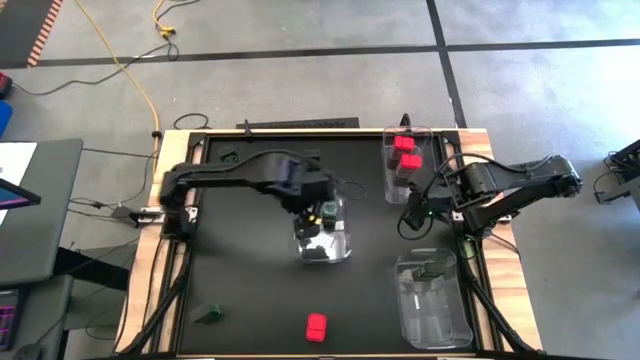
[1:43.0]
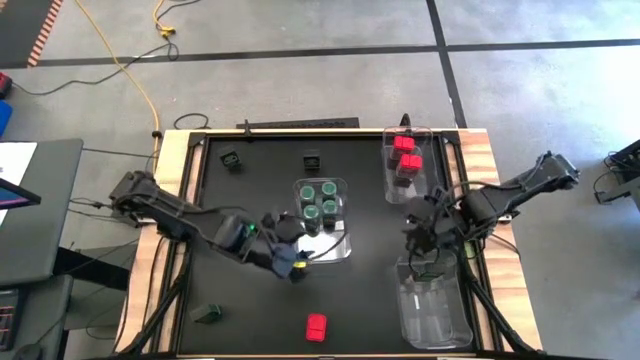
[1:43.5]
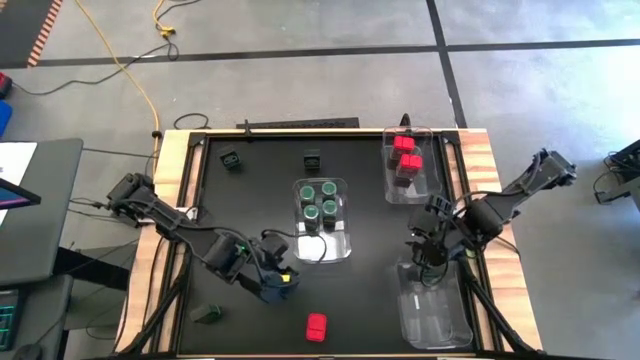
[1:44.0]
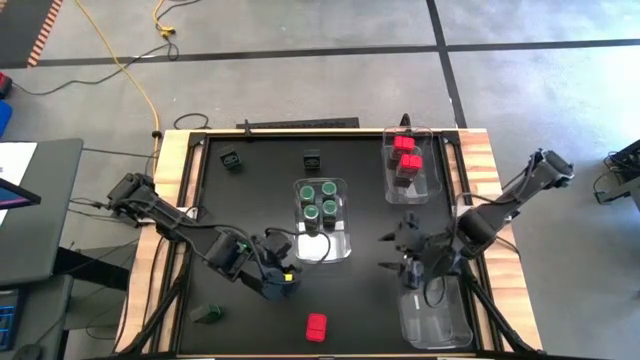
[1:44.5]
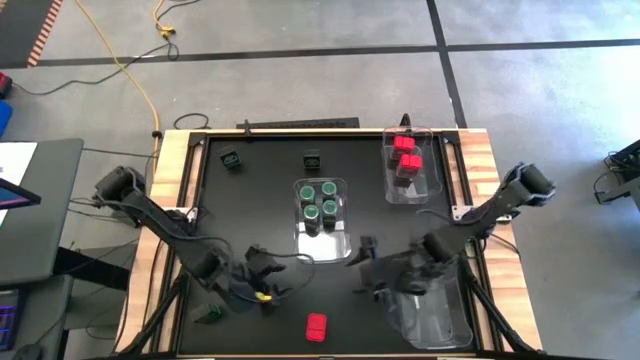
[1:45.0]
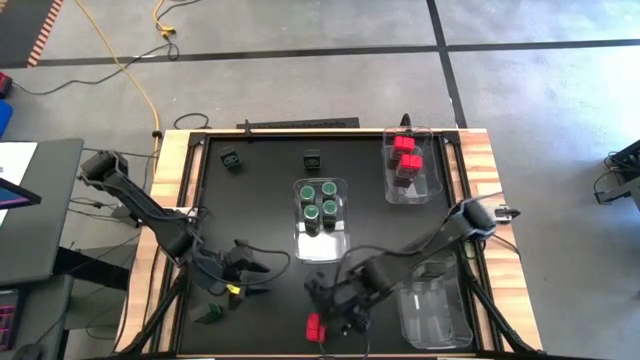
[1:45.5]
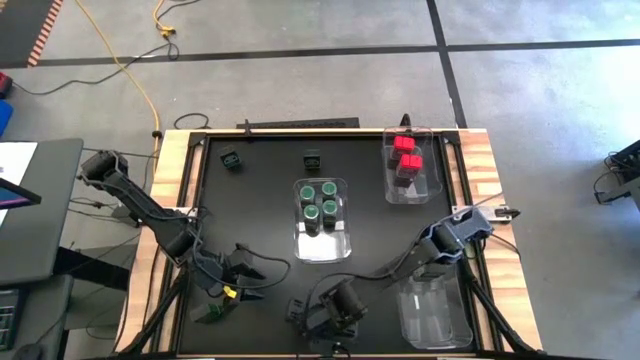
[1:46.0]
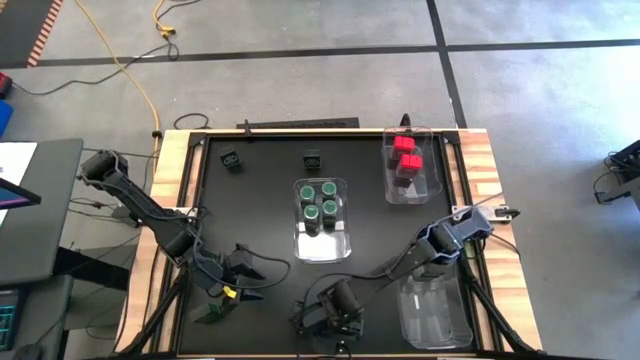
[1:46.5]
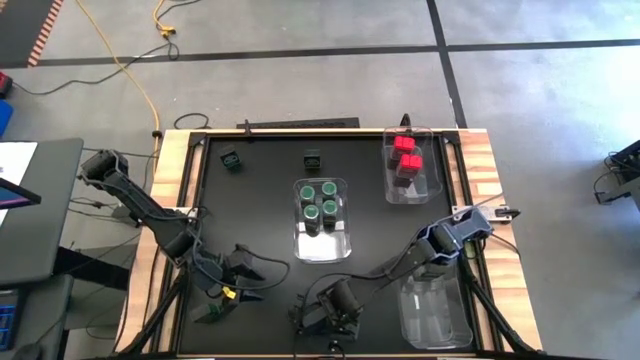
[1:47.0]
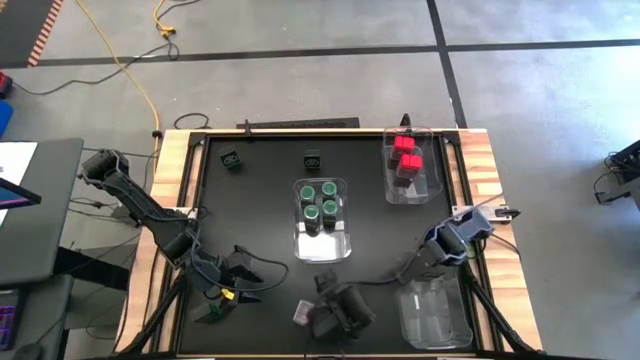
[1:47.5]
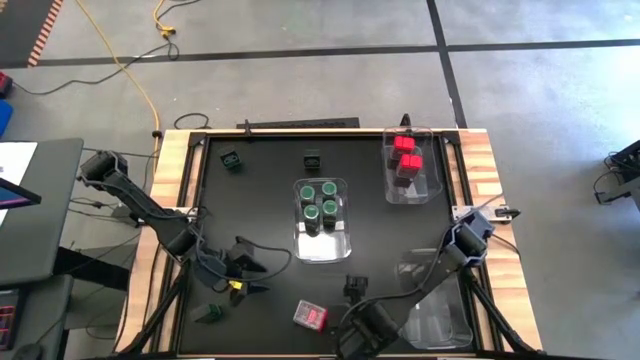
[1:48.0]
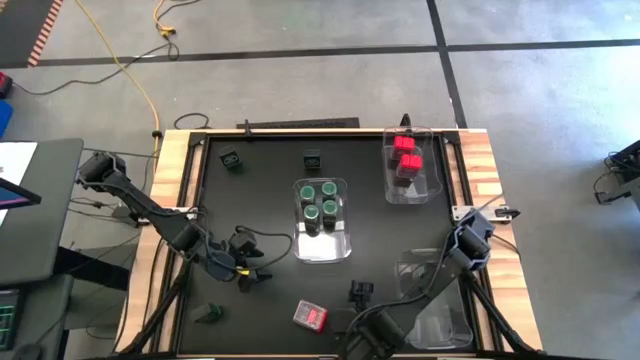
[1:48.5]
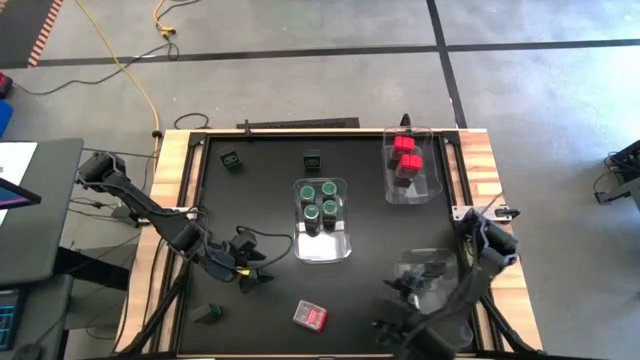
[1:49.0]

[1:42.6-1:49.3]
Task: Sort spices by type
Put the red seasoning can into the top transparent bin

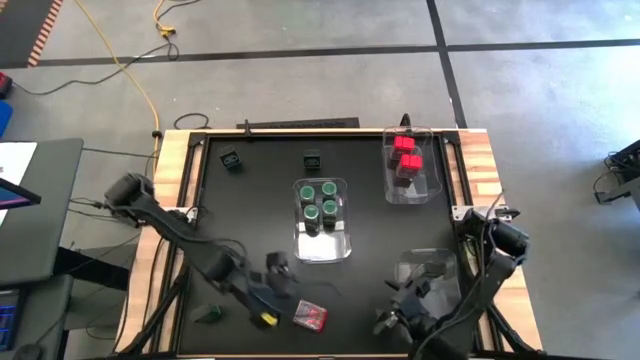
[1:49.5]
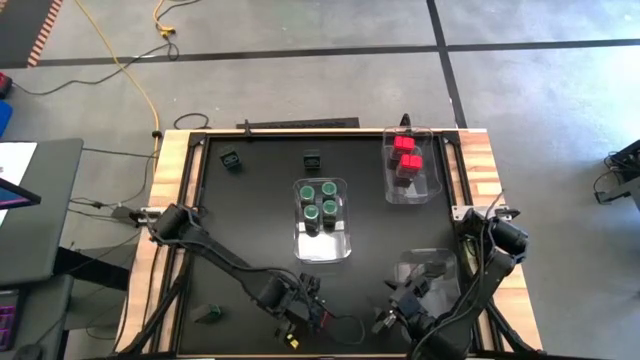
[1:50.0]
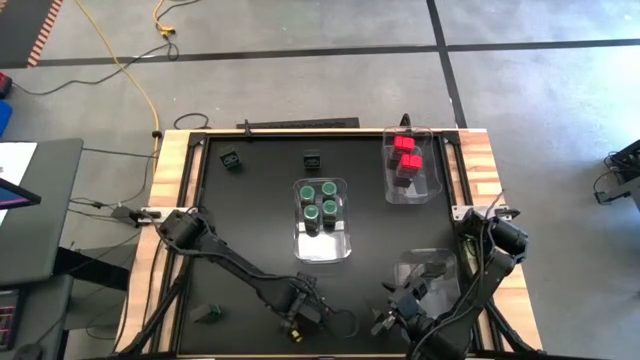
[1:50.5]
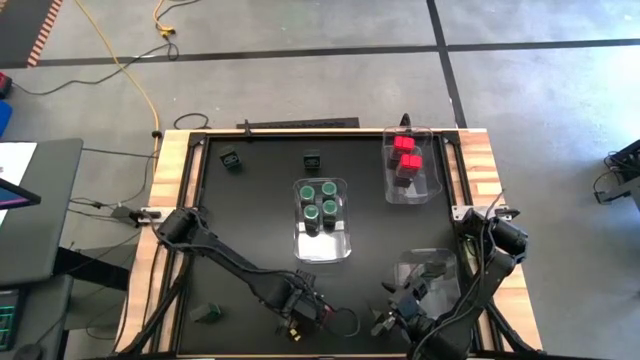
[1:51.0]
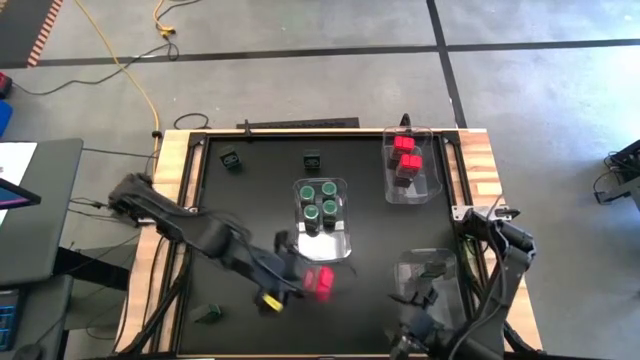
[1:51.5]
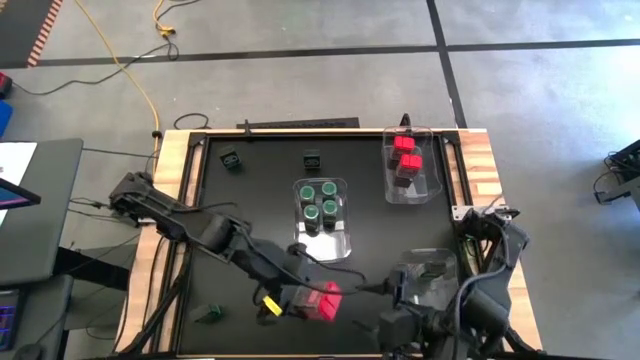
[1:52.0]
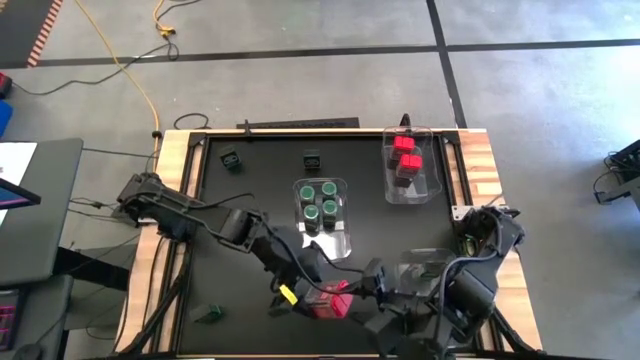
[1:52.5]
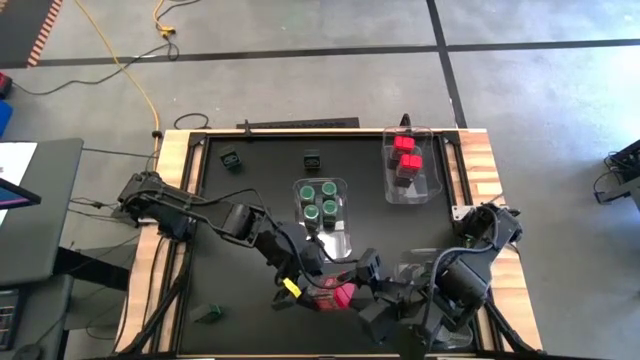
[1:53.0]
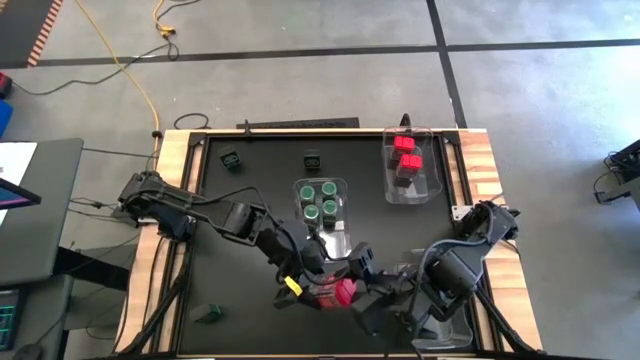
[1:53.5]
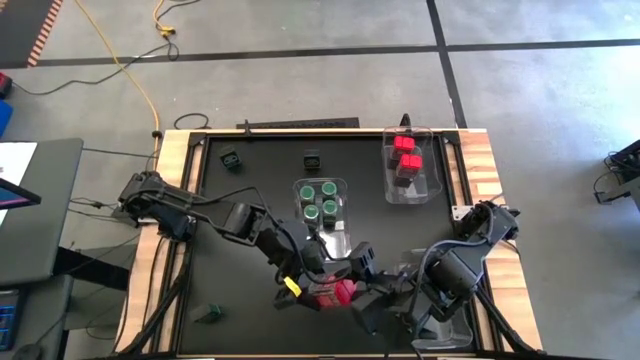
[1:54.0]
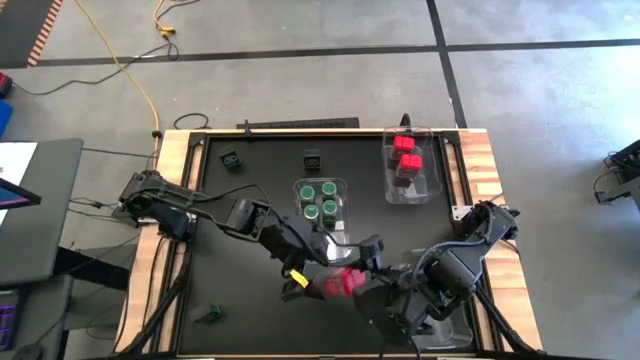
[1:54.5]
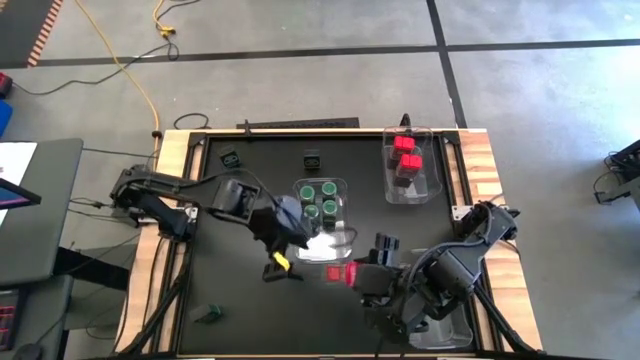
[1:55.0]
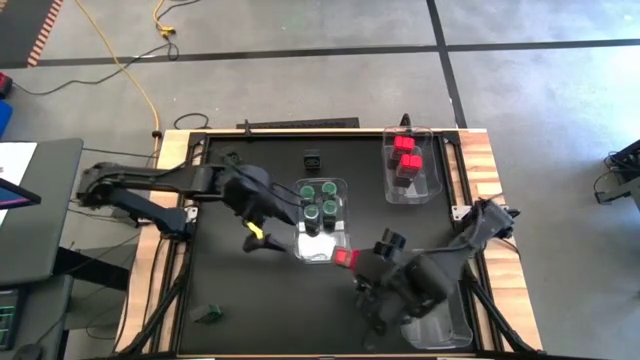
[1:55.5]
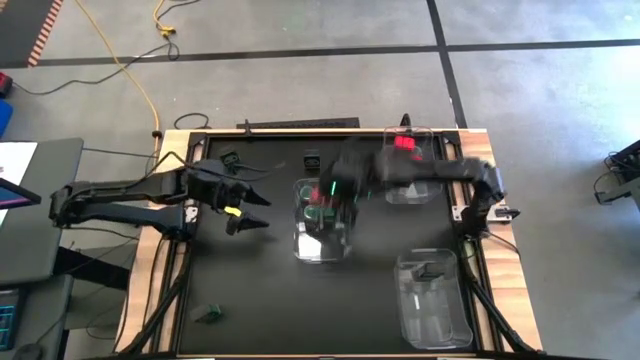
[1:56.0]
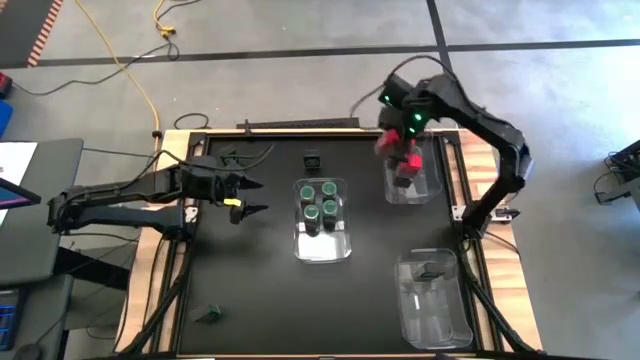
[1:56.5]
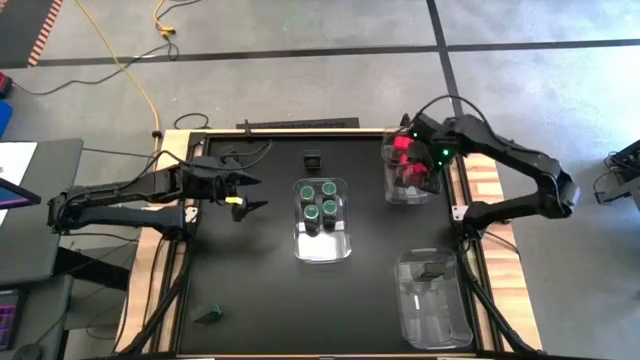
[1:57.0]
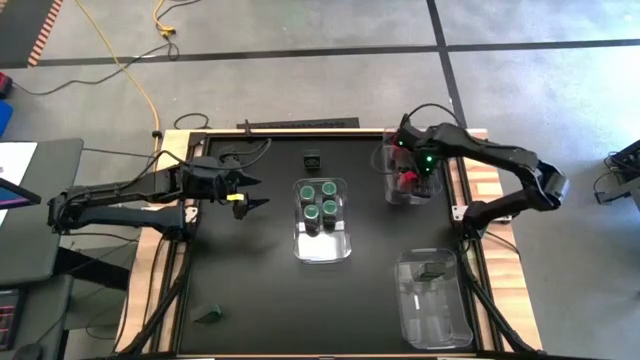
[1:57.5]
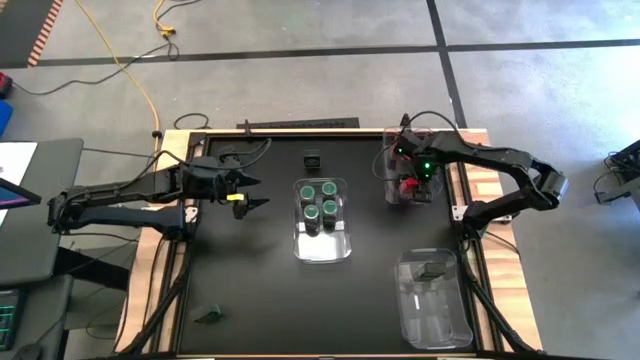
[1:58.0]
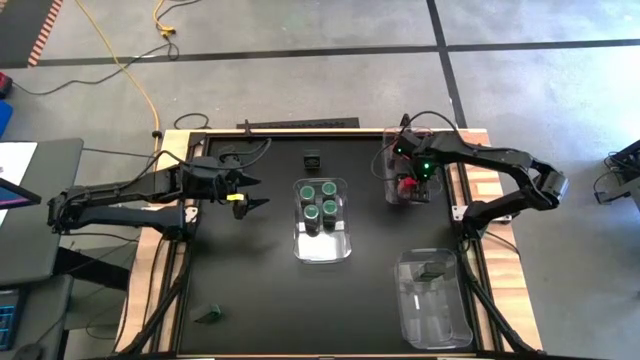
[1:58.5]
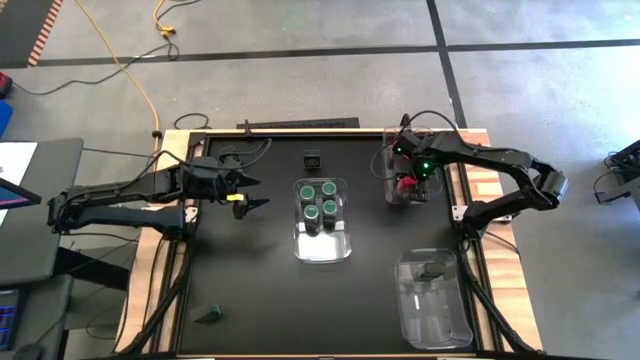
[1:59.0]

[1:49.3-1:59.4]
Put the red seasoning can into the top transparent bin

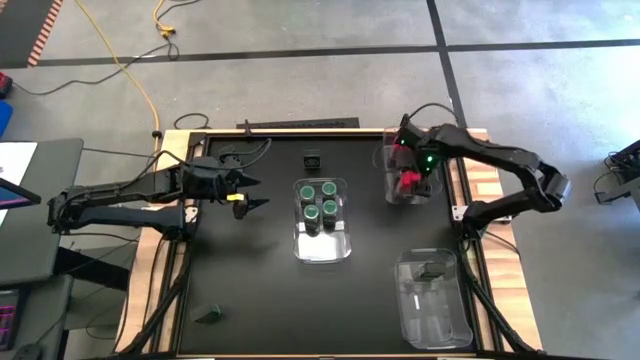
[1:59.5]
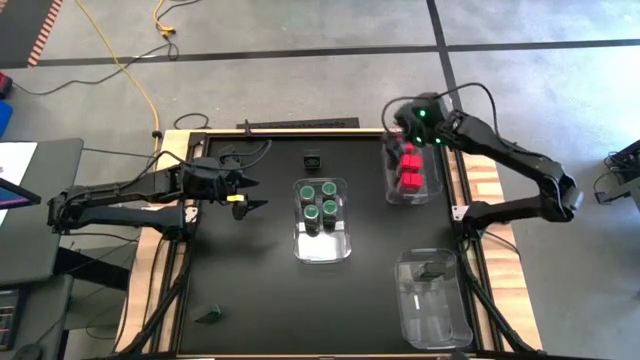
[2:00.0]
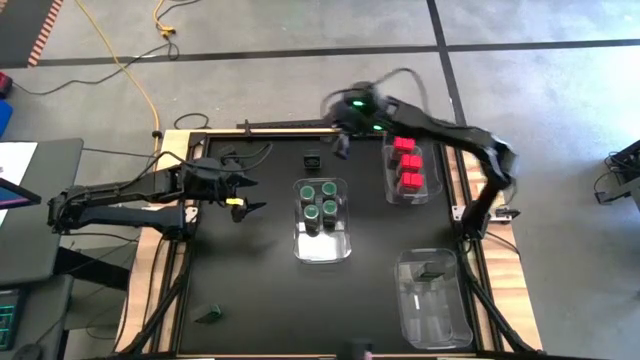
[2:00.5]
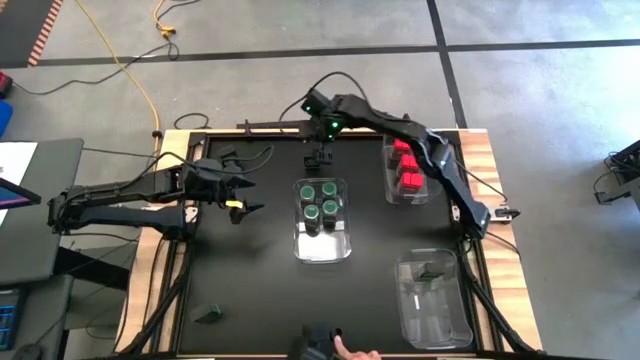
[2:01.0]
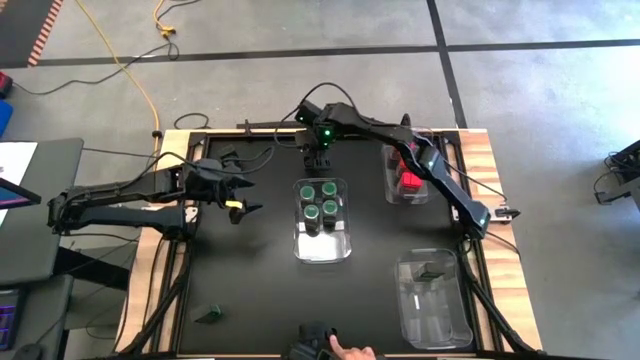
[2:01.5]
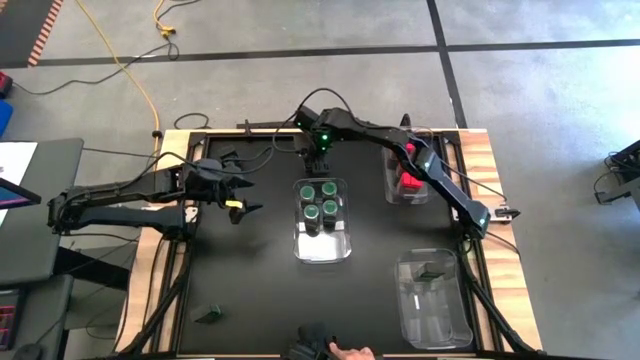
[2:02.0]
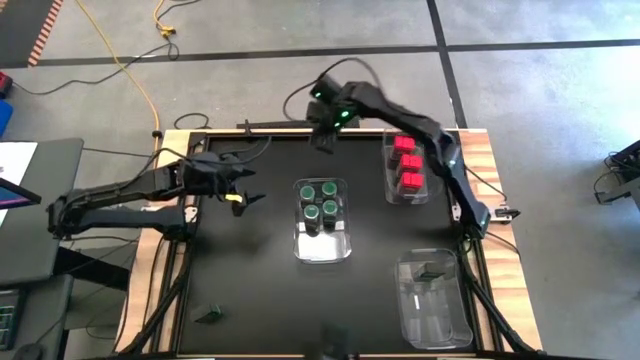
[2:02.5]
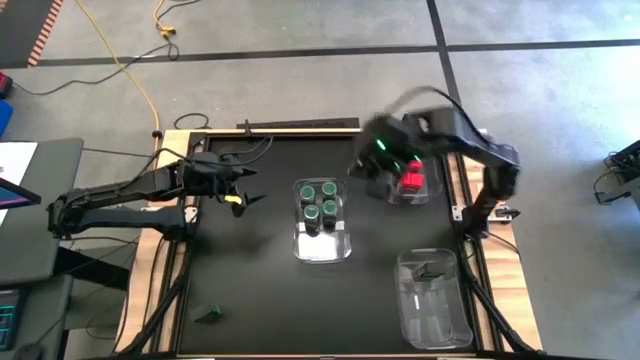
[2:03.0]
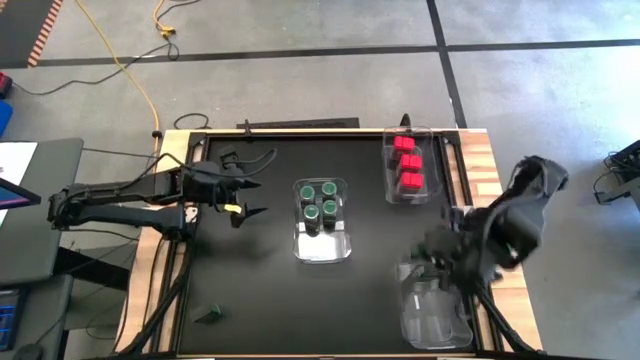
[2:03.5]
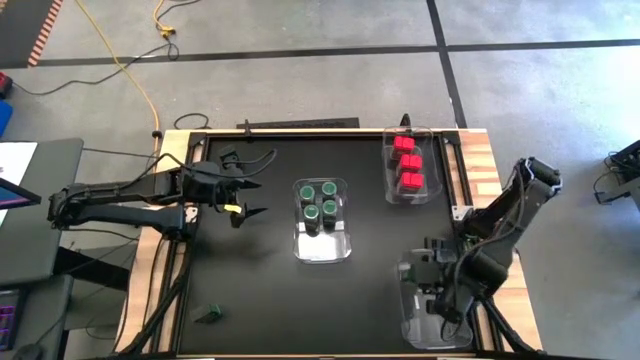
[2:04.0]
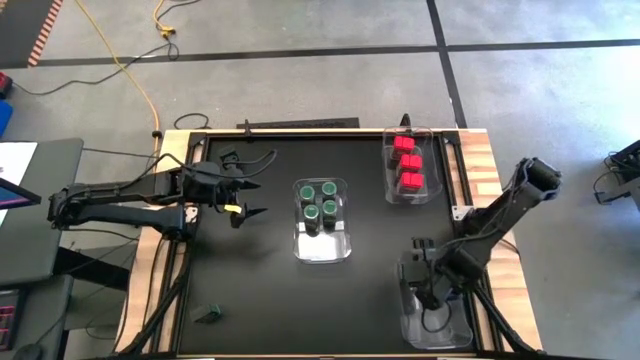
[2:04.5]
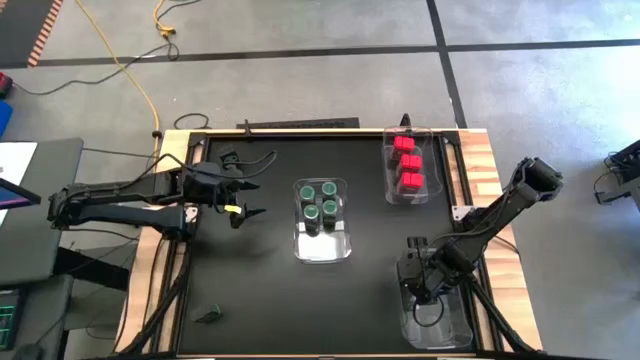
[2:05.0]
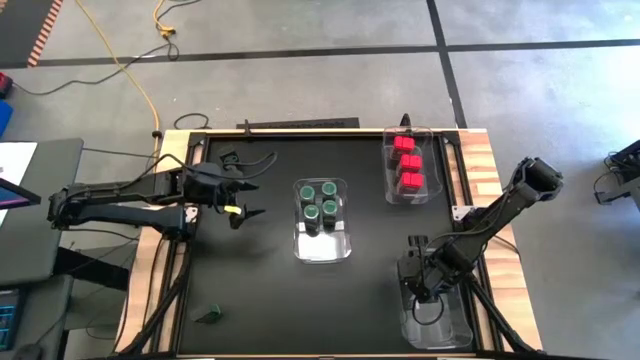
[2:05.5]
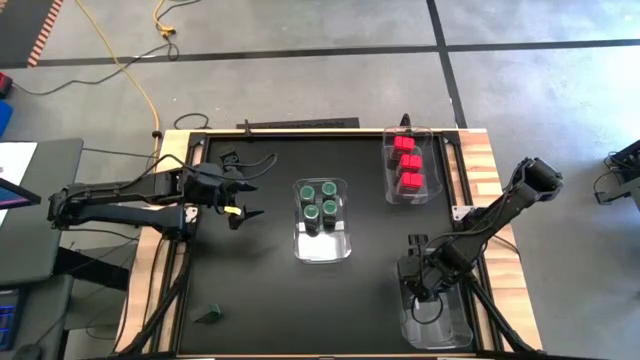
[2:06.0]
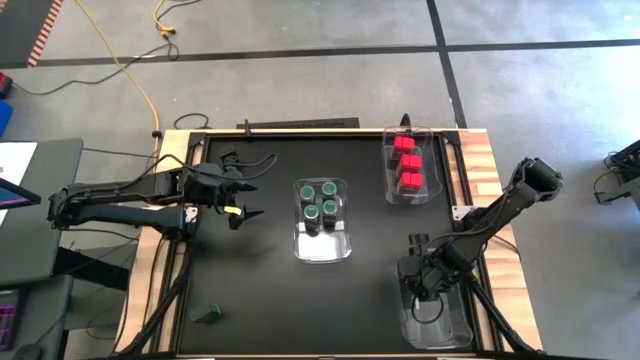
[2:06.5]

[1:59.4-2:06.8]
Put the black seasoning can into the bottom transparent bin
